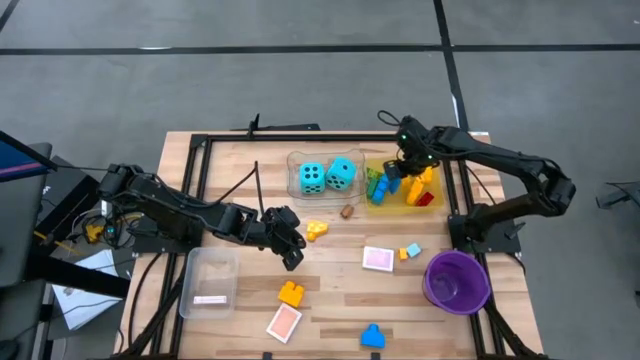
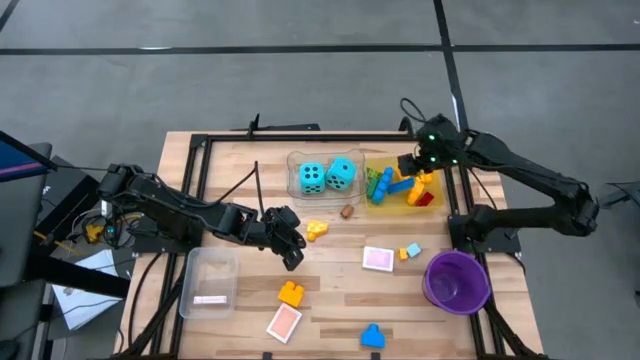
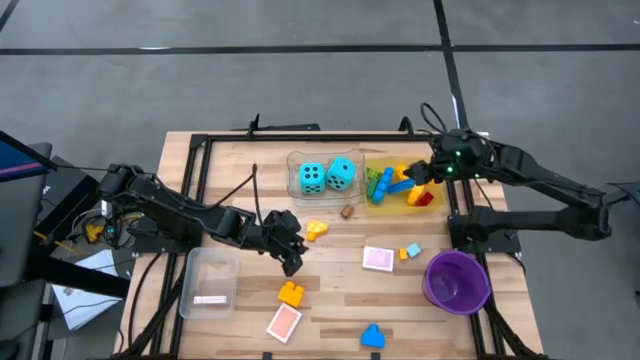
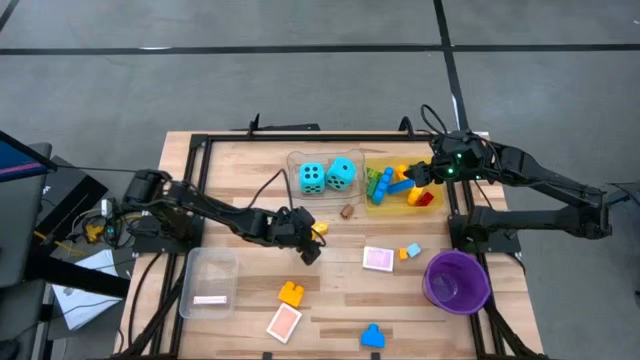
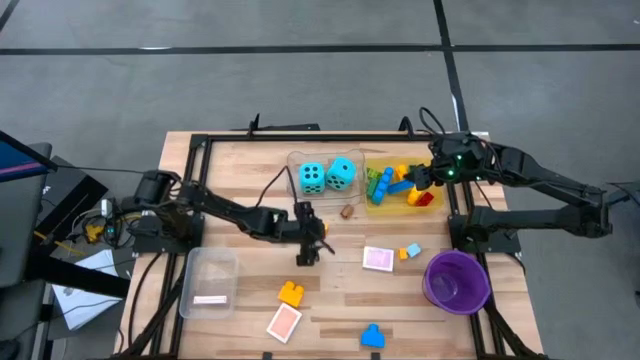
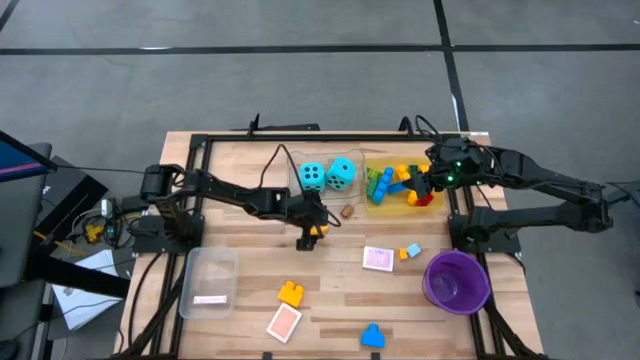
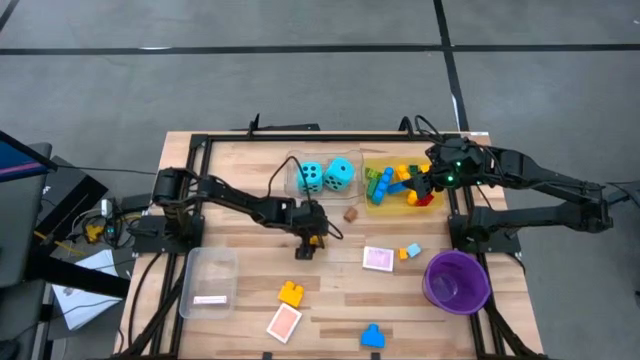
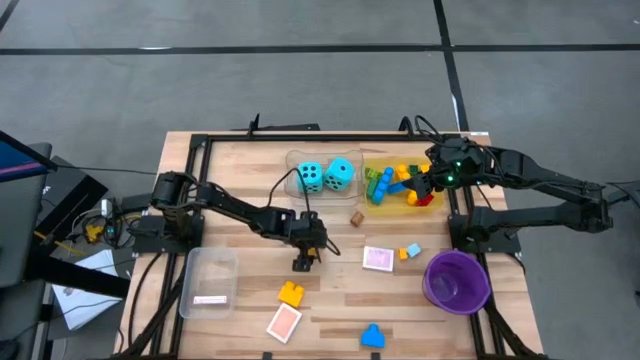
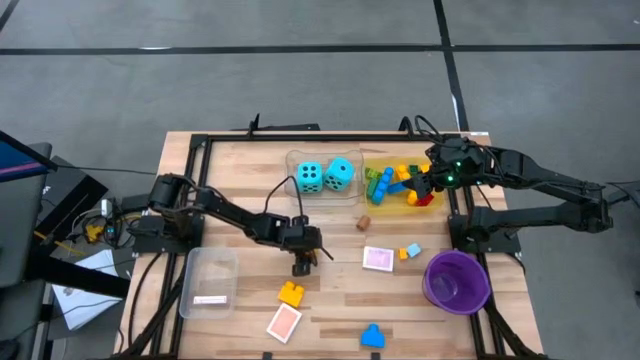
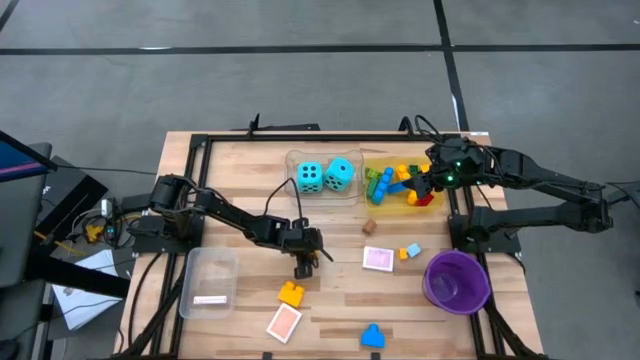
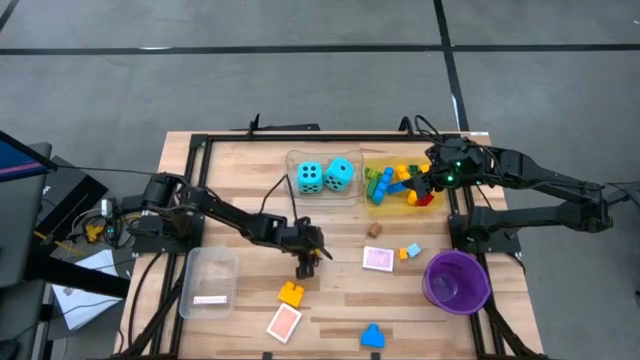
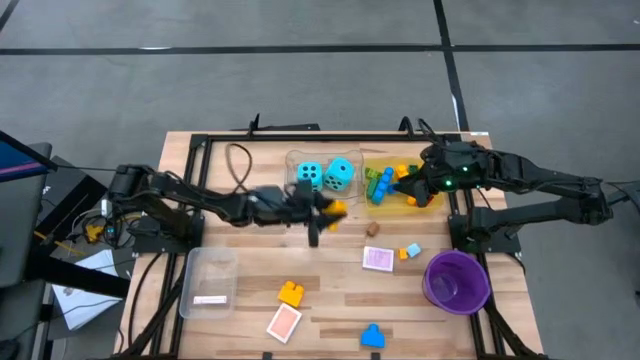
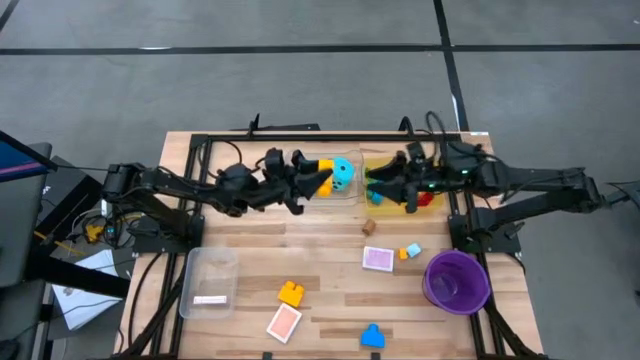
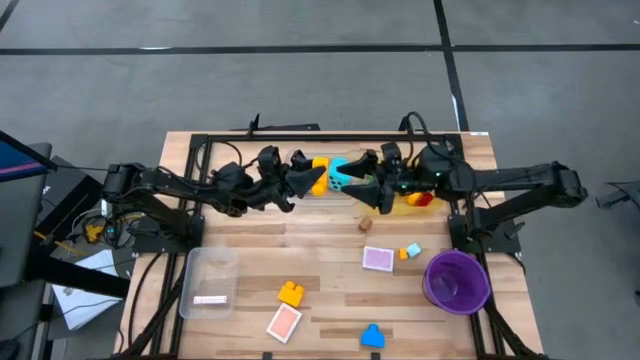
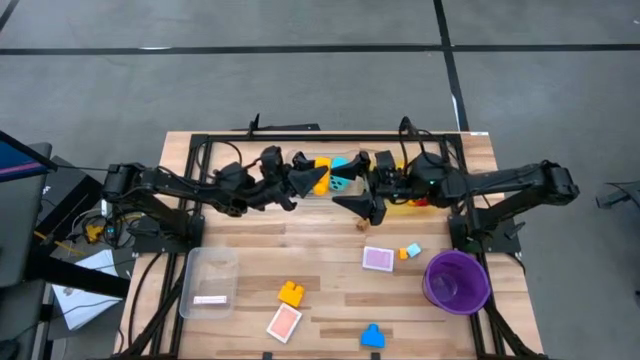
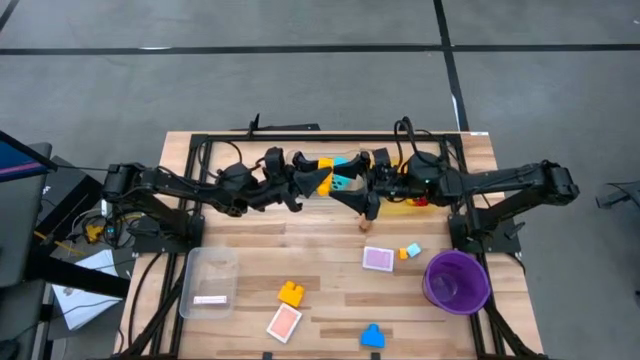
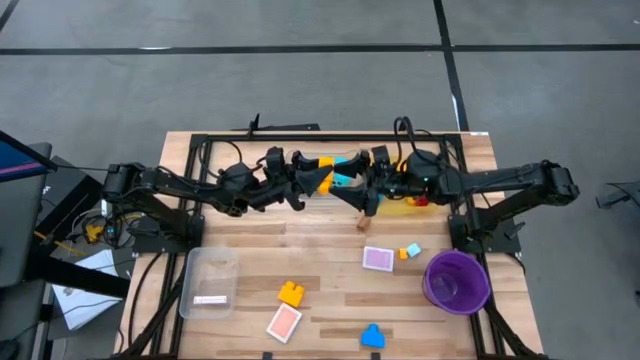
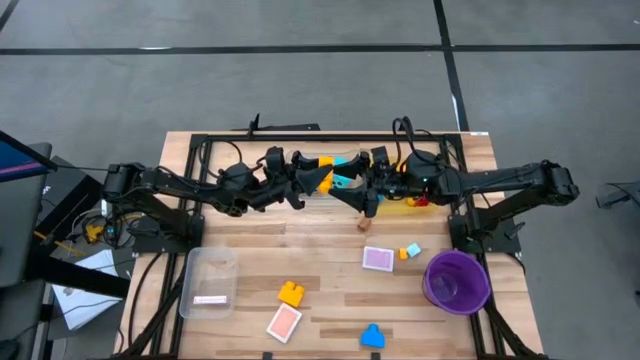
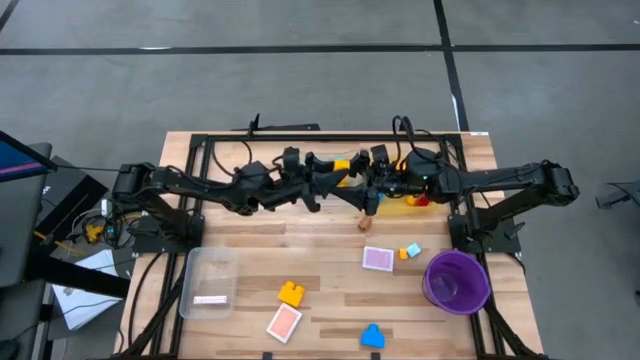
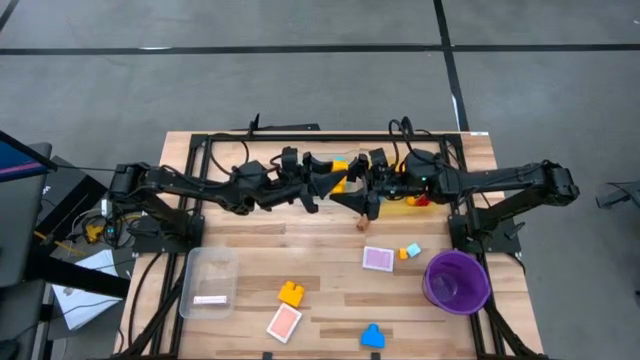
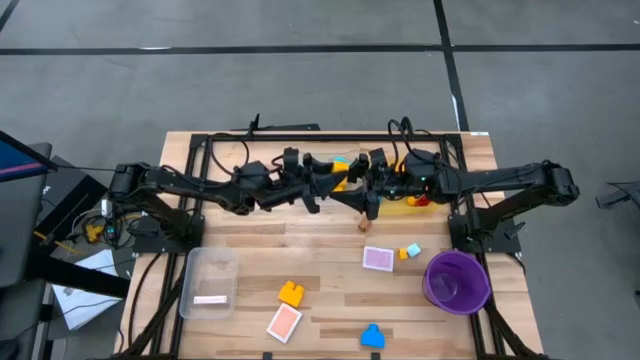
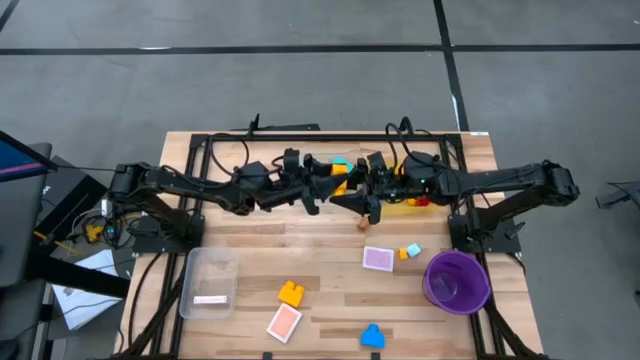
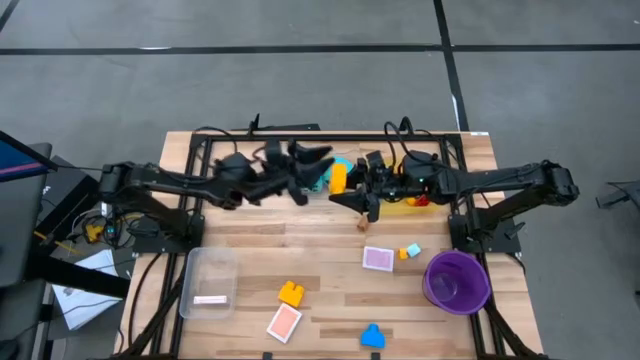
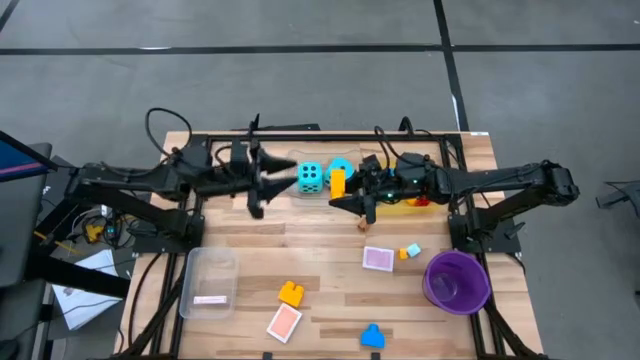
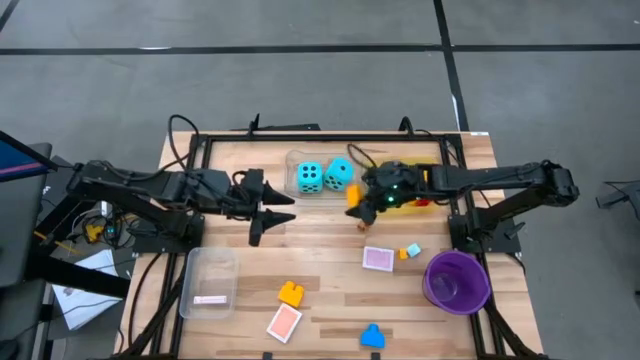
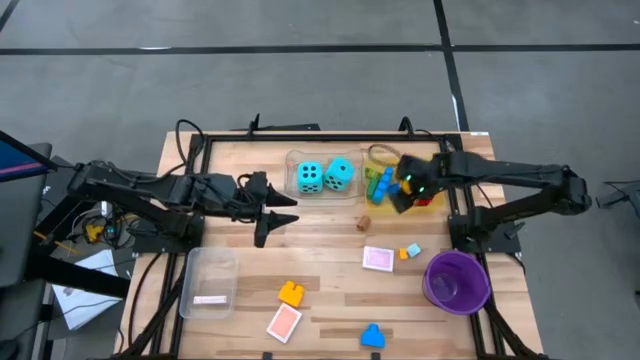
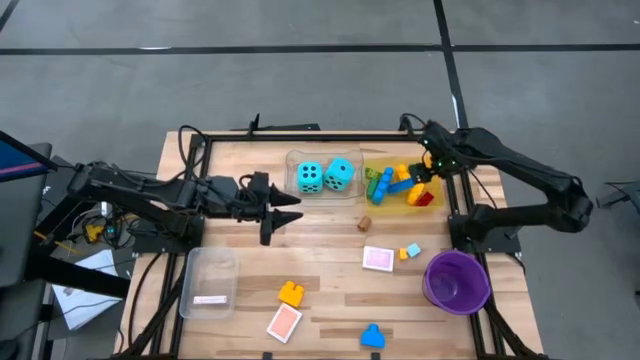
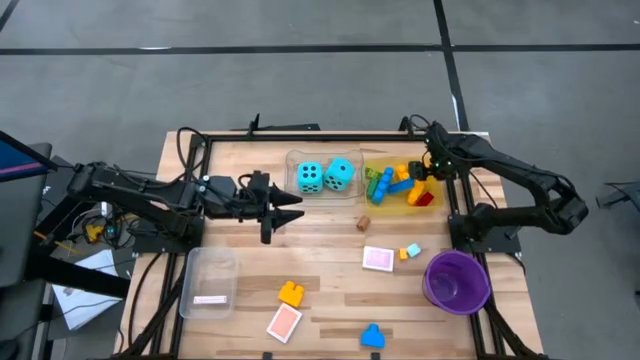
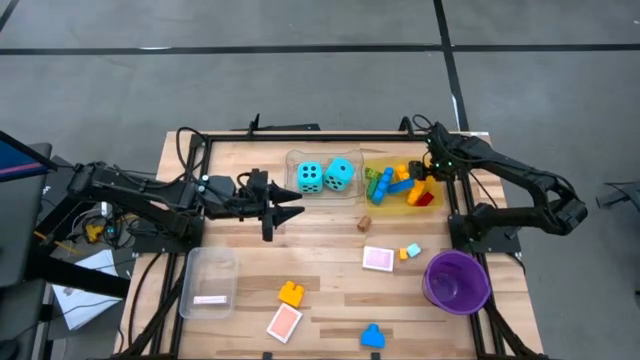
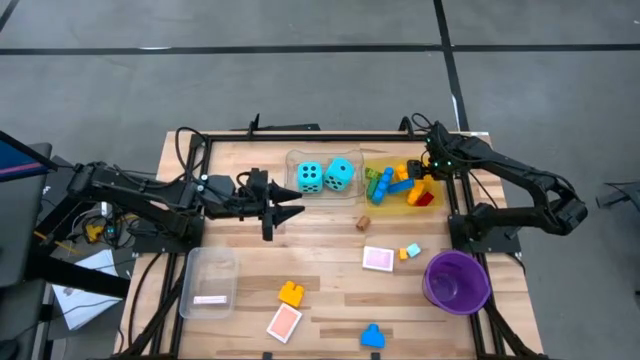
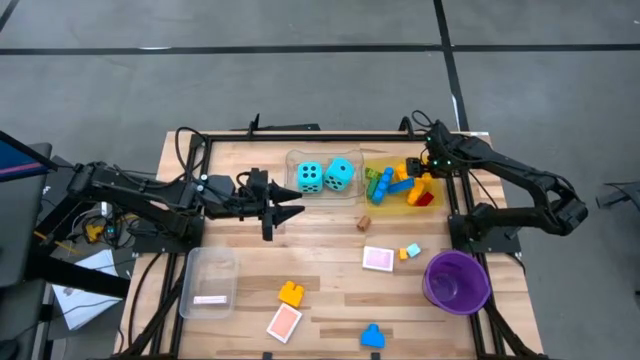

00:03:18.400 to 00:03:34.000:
Task: Pick & Place Toys
Put the yellow game piece into the yellow bin

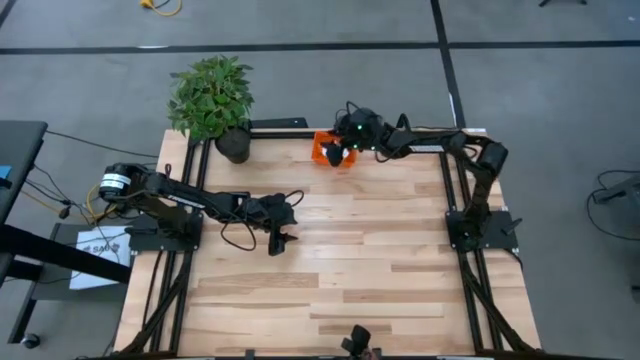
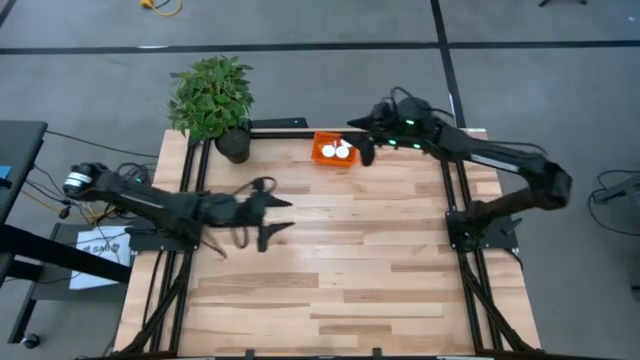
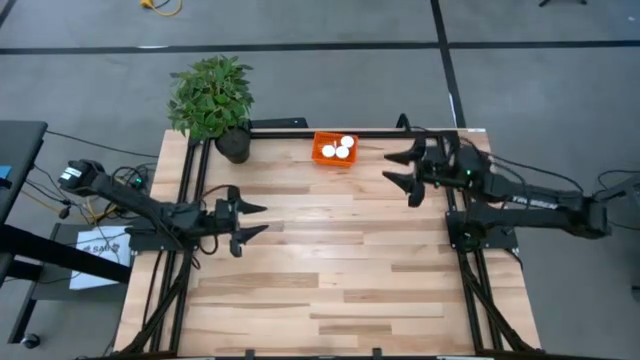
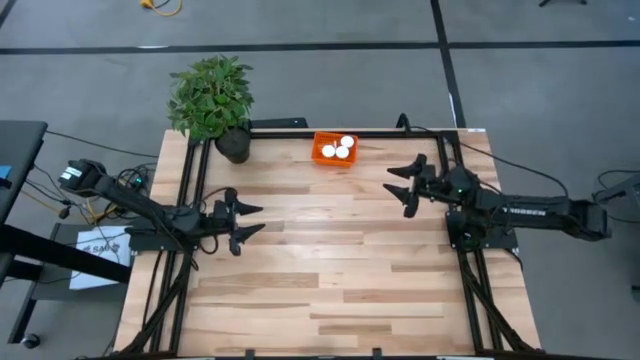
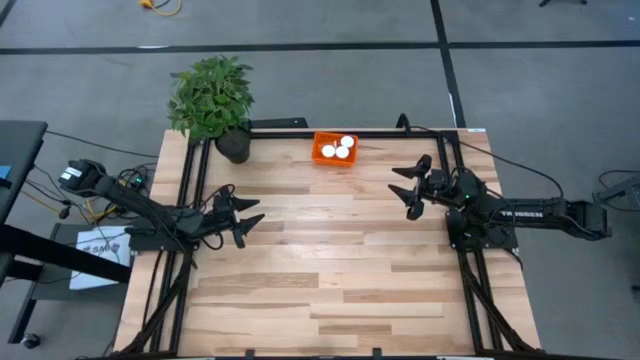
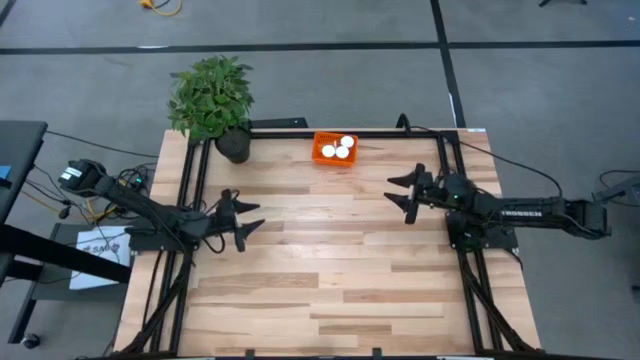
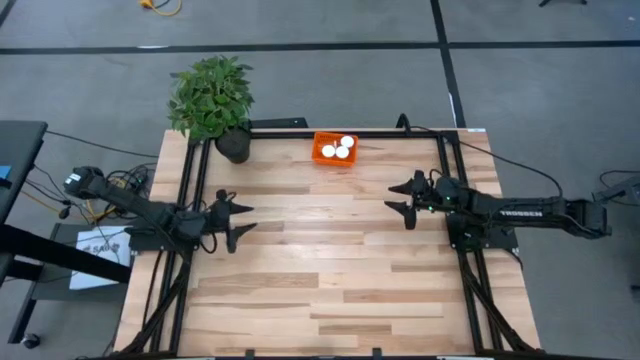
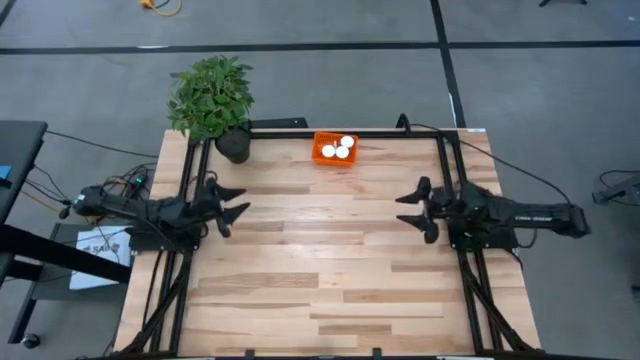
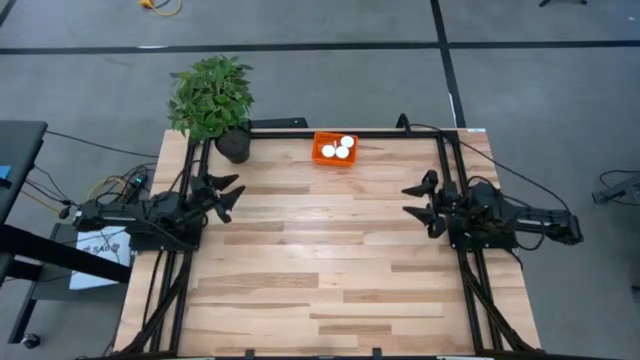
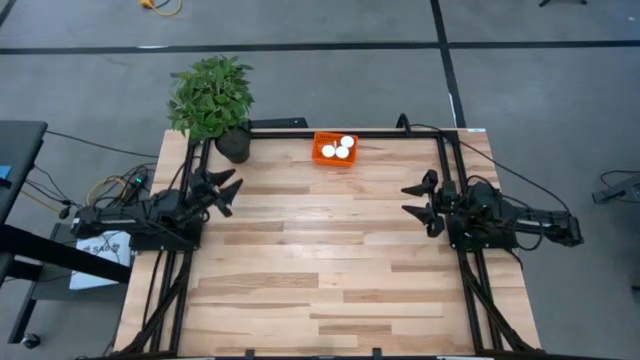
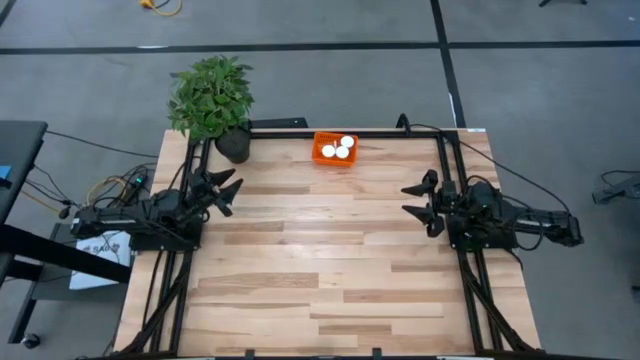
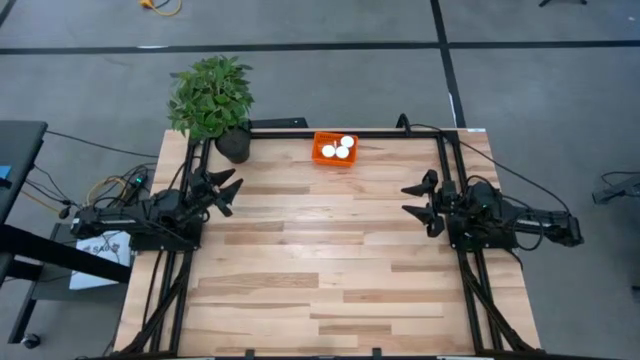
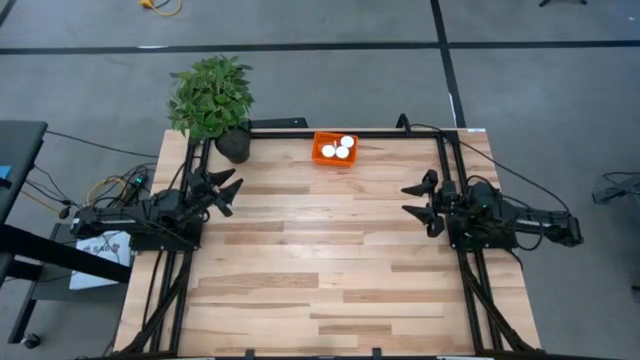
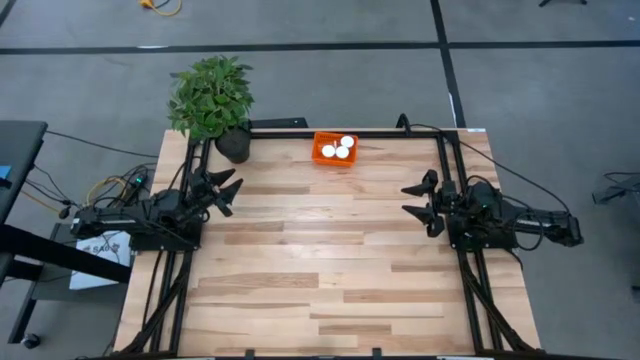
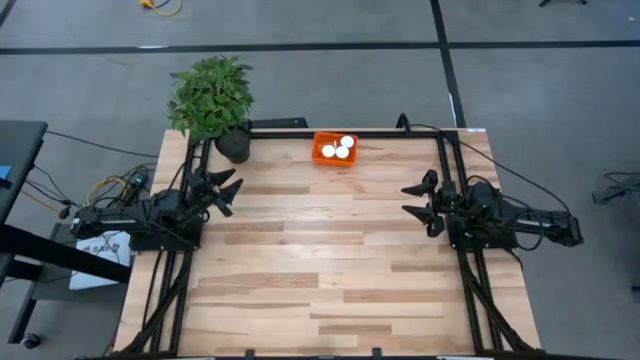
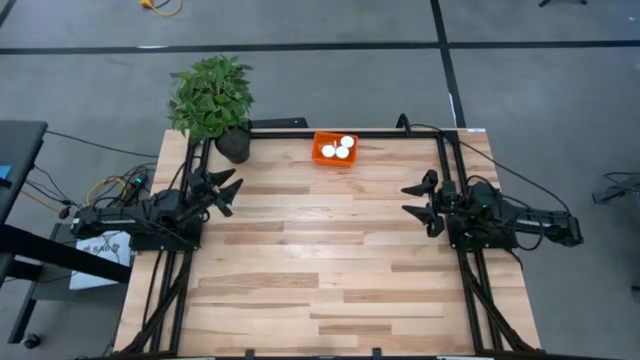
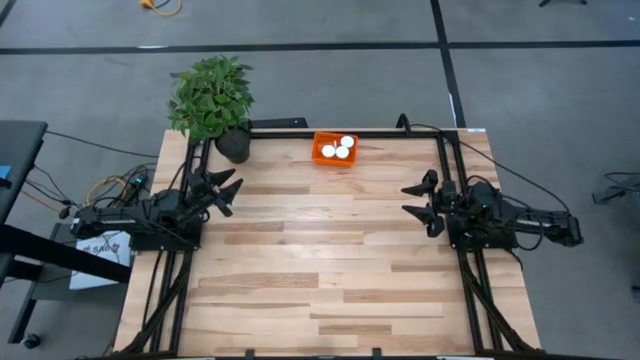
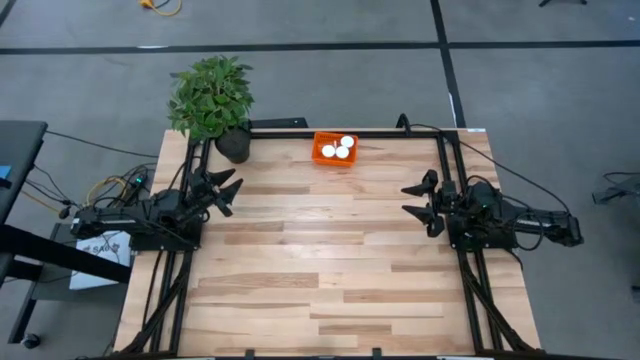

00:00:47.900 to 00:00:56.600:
Task: Pick and place pill bottles into a basket
Return to Home Position
